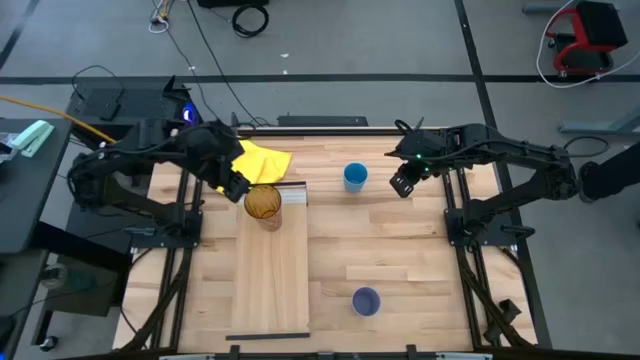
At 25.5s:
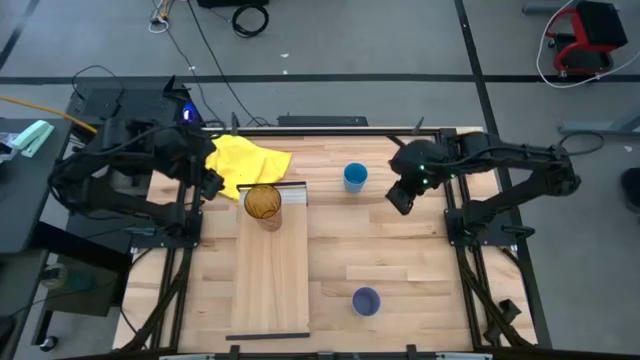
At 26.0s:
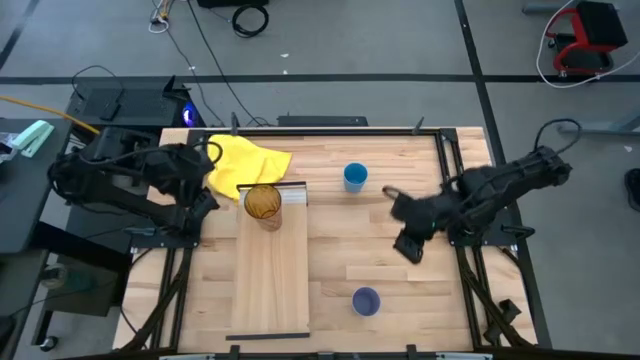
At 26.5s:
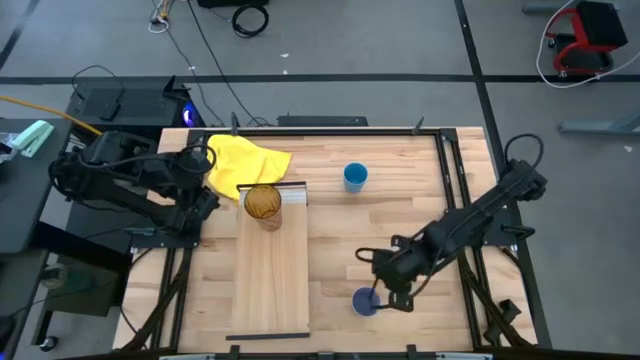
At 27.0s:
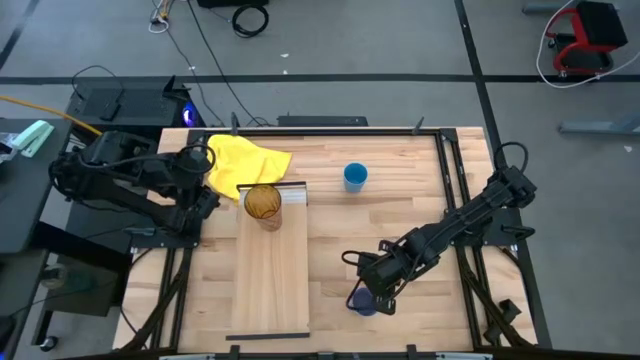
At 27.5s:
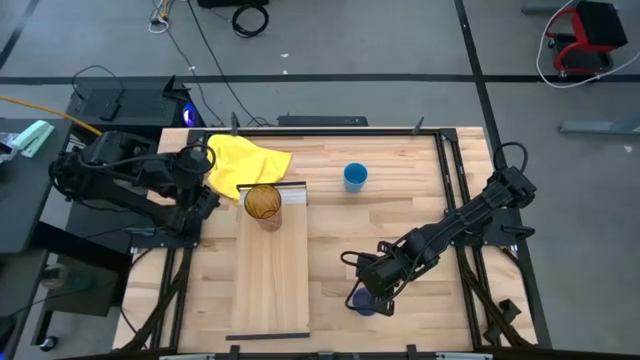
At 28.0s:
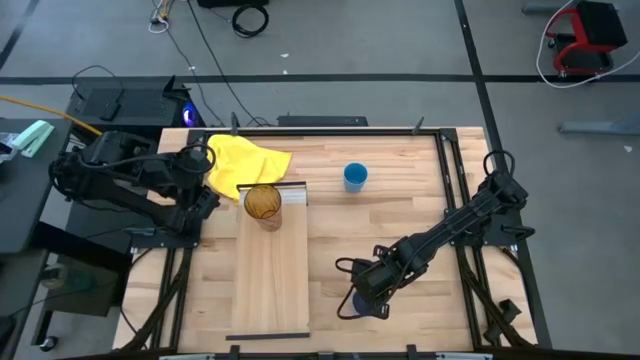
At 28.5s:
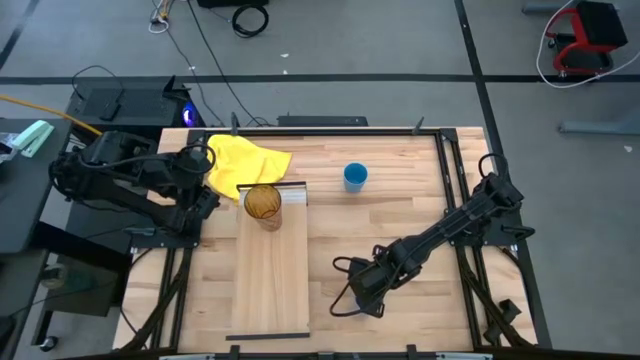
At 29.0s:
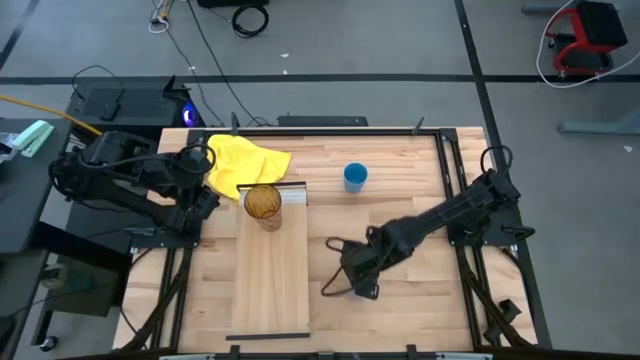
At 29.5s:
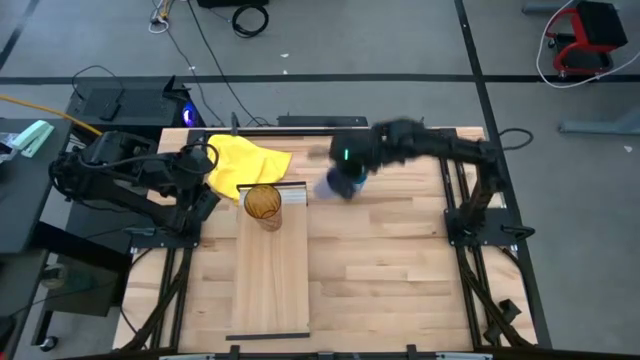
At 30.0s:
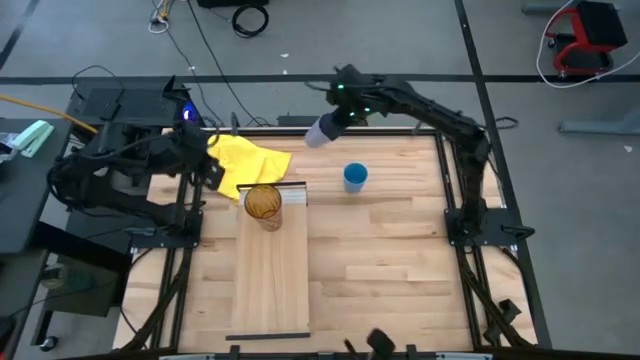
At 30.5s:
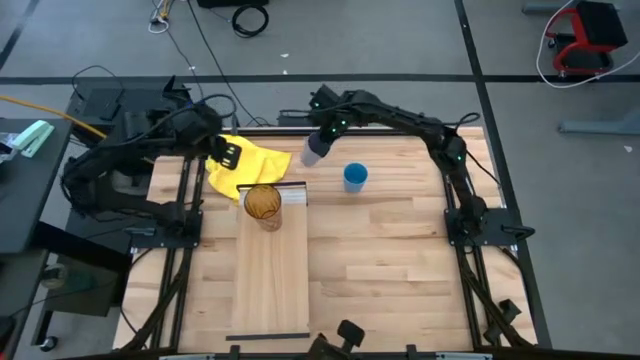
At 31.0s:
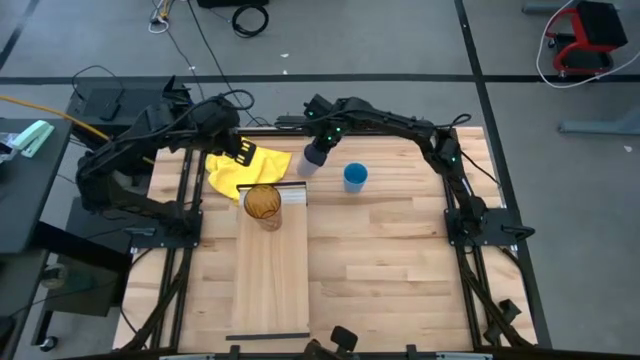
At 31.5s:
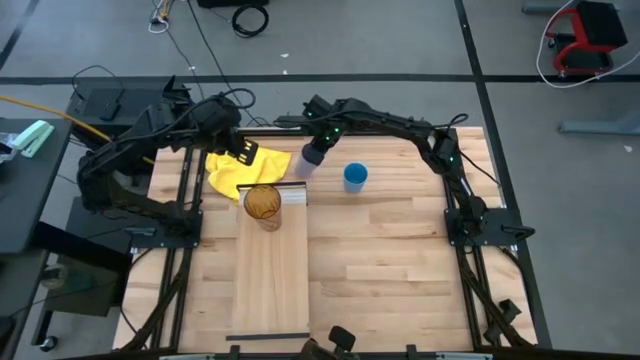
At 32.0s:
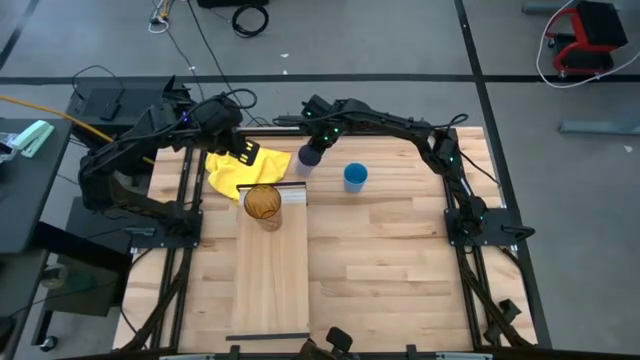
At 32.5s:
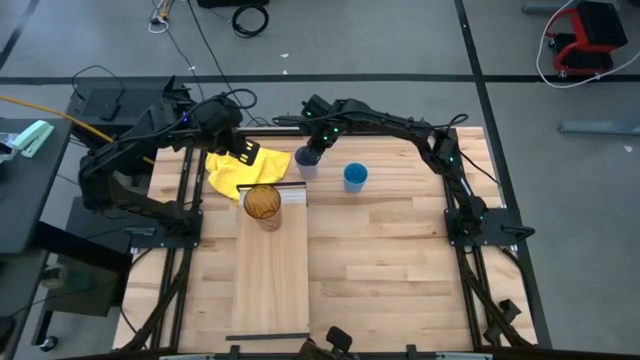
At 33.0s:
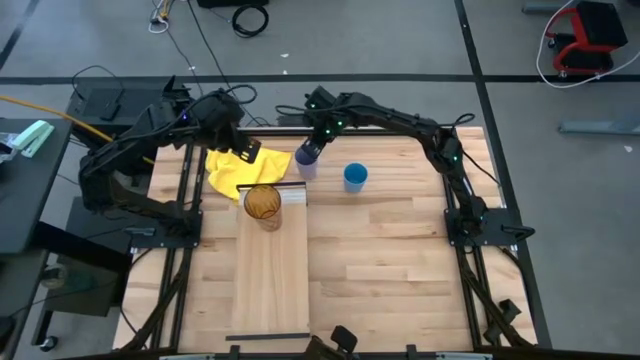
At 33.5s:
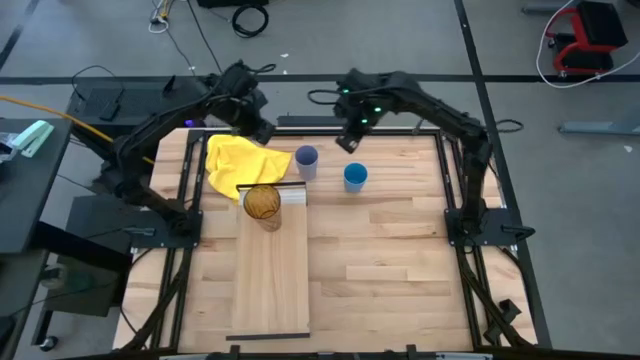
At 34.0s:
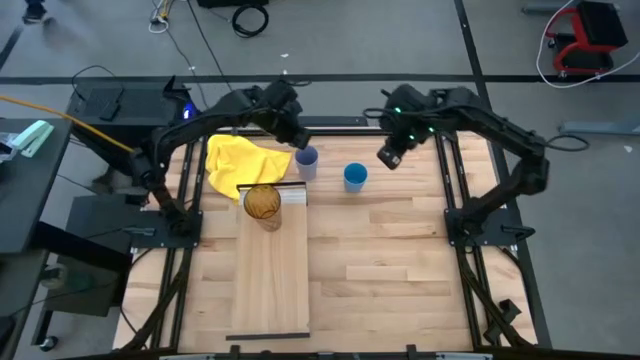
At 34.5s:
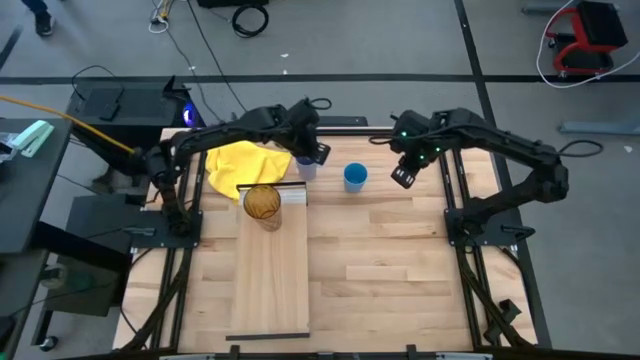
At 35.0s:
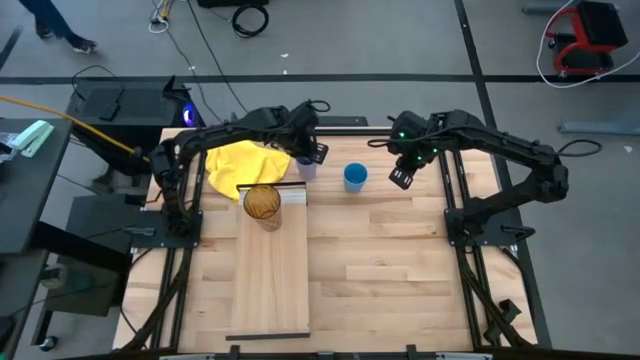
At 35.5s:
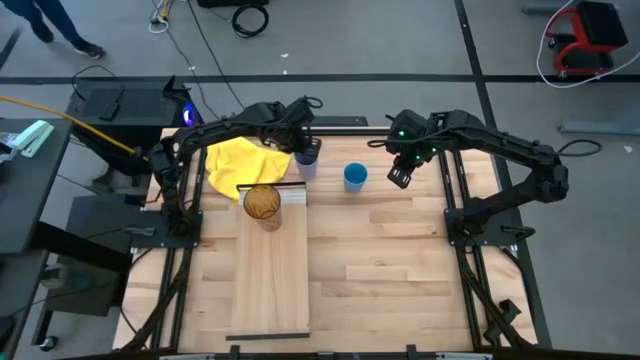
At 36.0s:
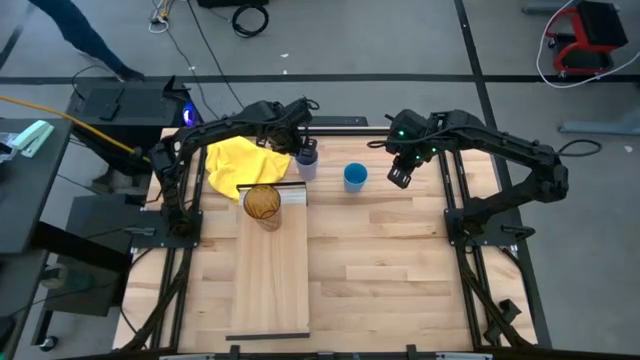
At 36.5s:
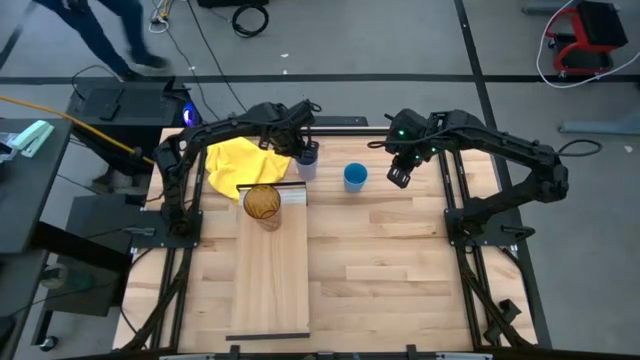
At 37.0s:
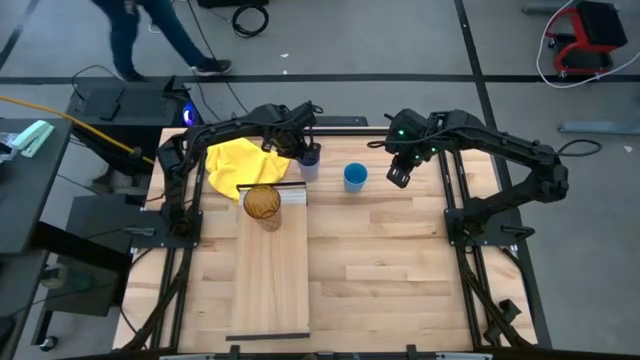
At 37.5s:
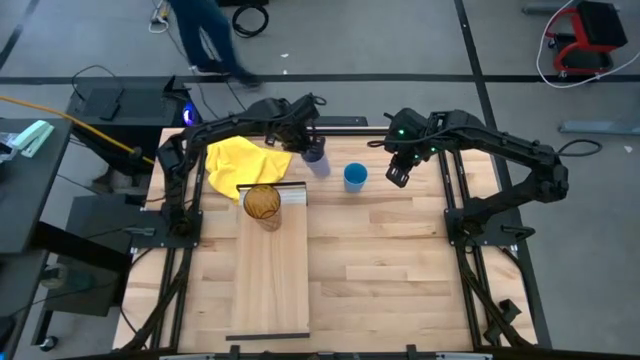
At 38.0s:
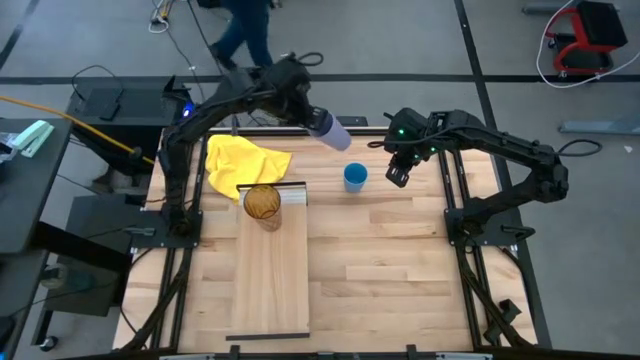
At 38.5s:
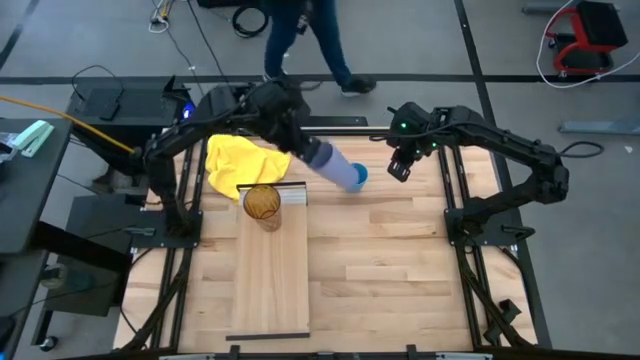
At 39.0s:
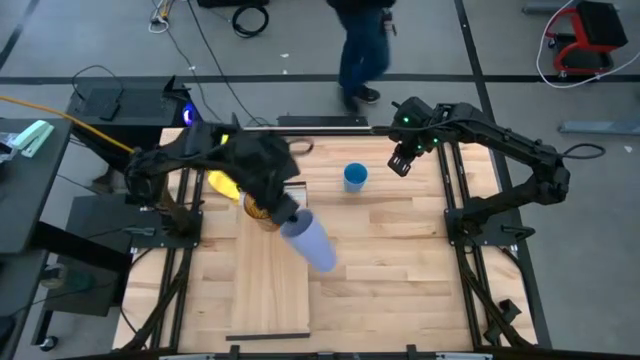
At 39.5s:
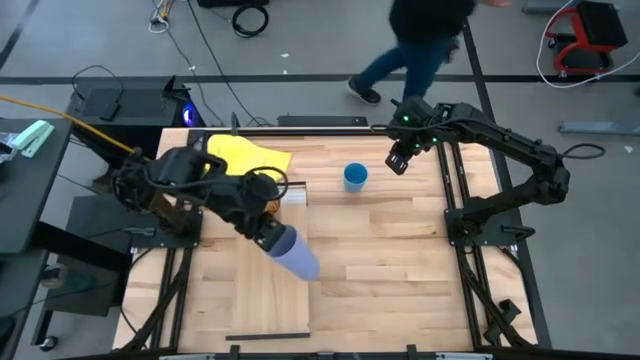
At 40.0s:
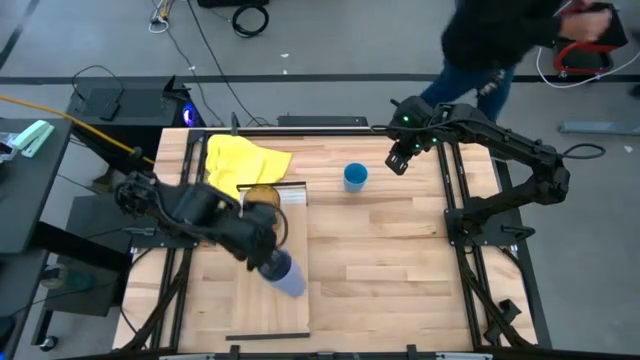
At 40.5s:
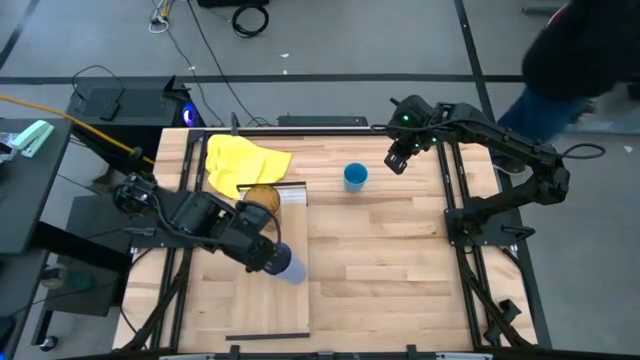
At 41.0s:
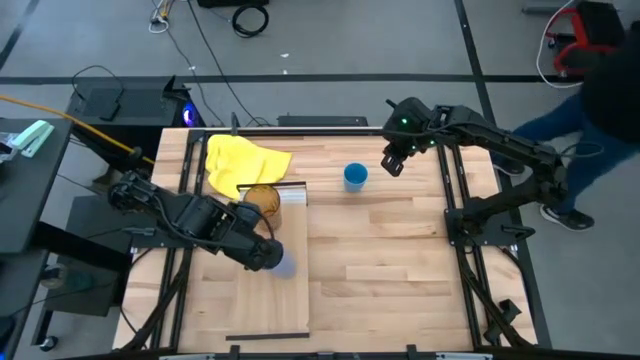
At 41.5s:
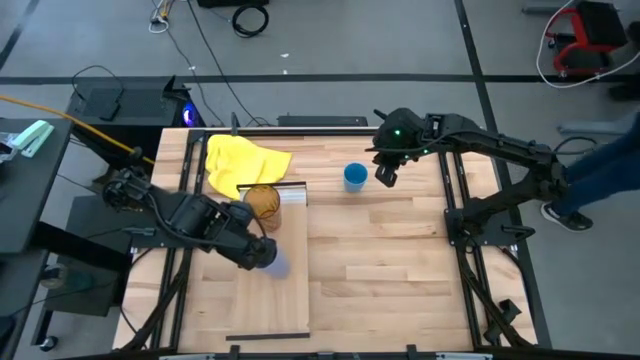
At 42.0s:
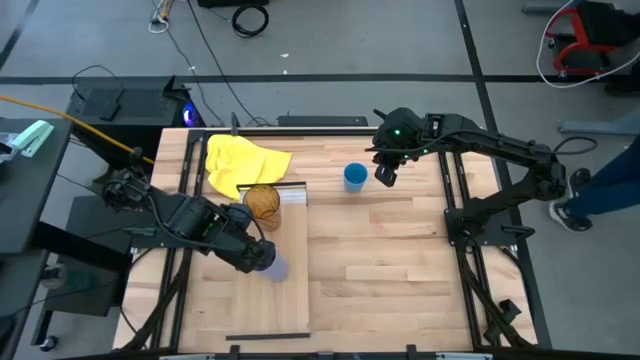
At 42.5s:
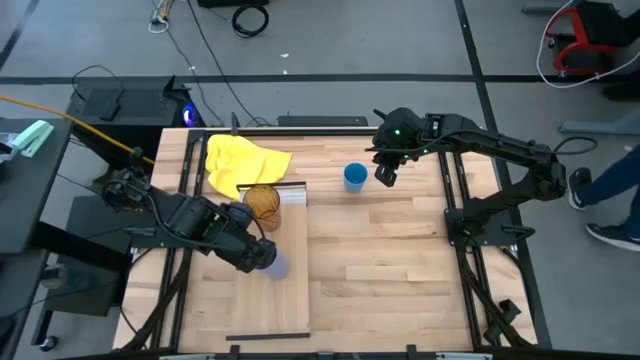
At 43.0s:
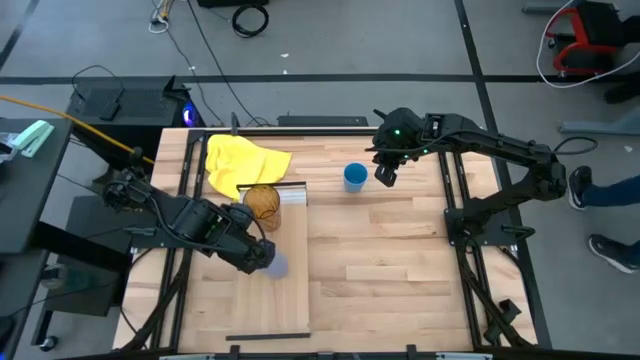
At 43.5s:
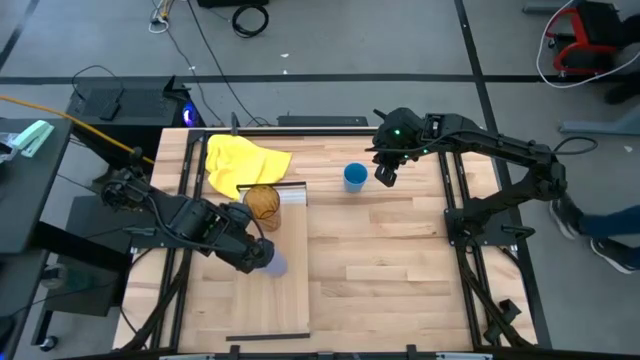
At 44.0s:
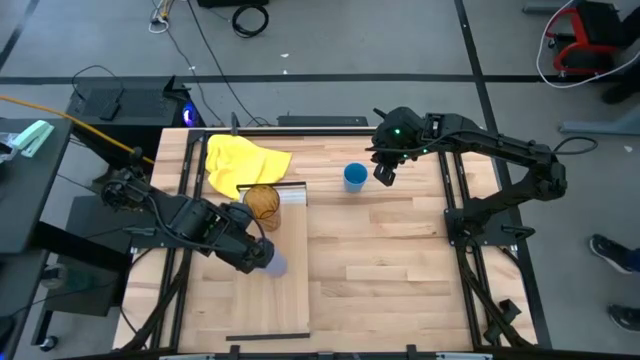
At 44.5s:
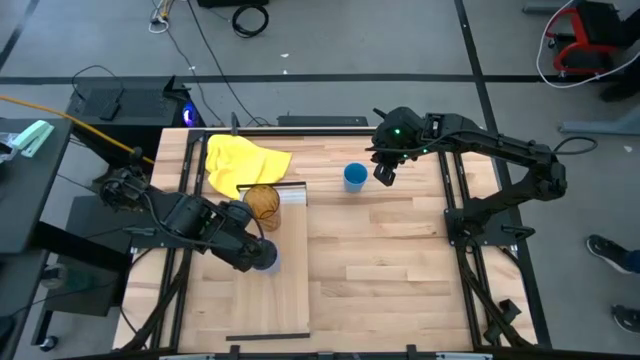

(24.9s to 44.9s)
Task: Stack small to large cups/mugs on shelf
Put the purple cup on the shelf

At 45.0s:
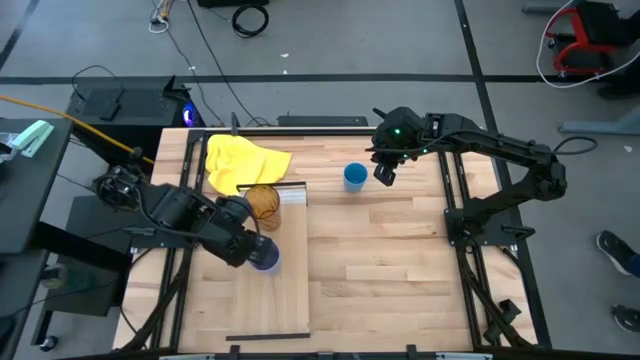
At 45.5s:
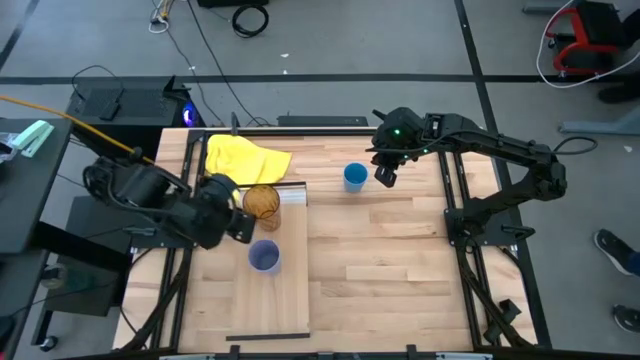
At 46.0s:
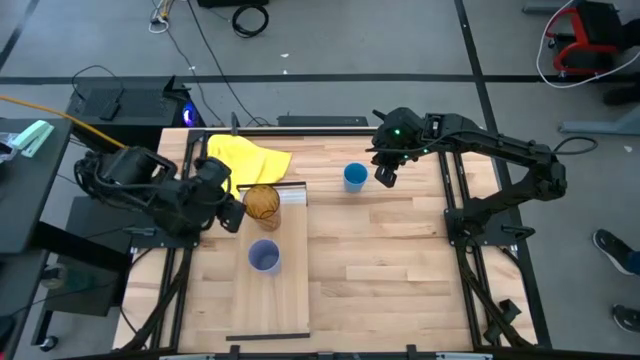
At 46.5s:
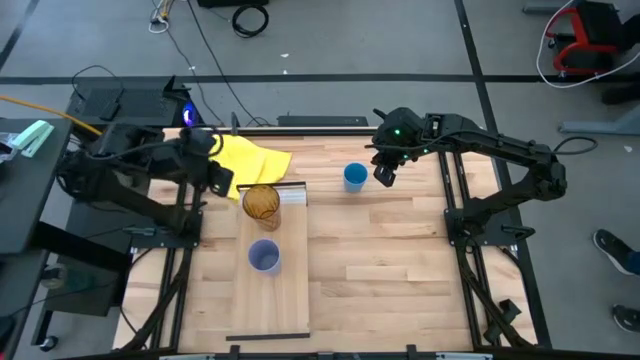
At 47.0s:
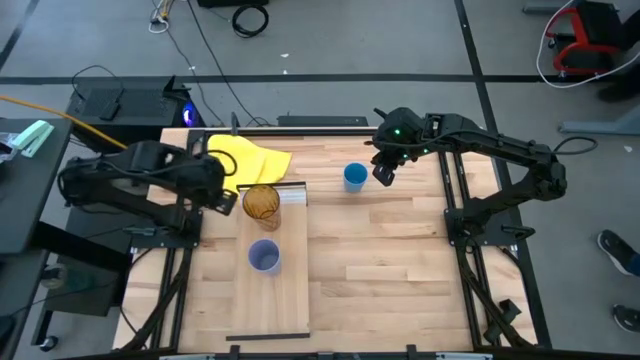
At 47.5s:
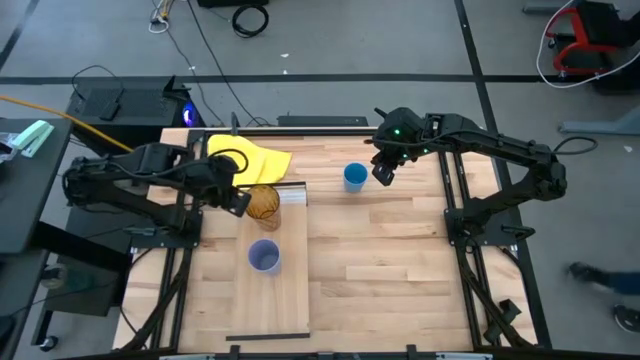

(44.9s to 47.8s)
Adjust the yellow cup on the shelf
